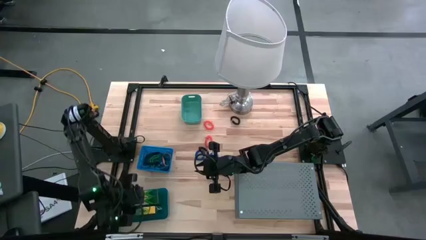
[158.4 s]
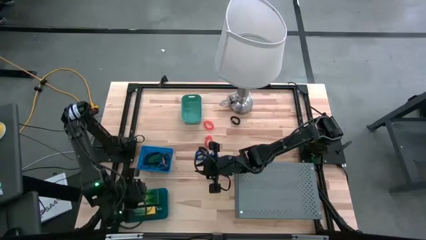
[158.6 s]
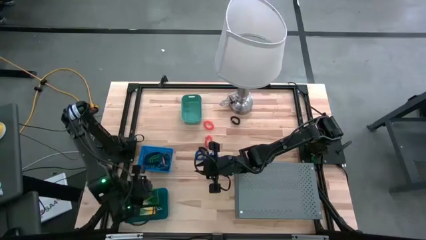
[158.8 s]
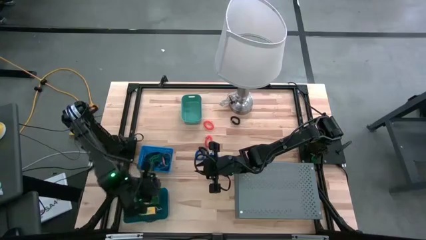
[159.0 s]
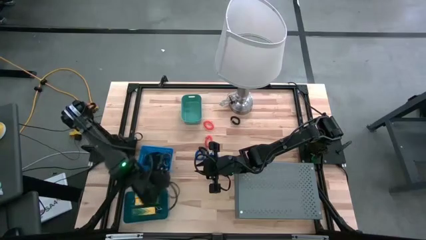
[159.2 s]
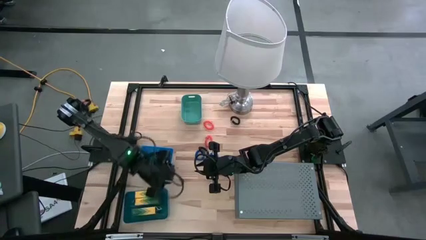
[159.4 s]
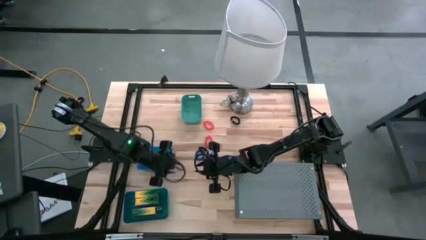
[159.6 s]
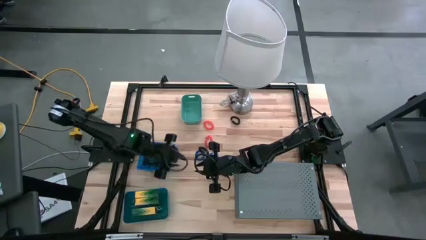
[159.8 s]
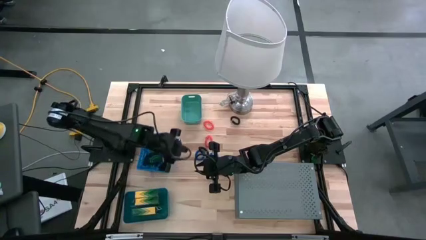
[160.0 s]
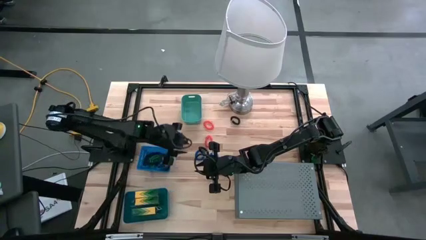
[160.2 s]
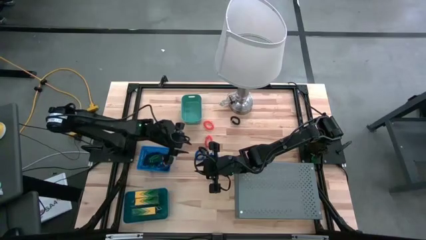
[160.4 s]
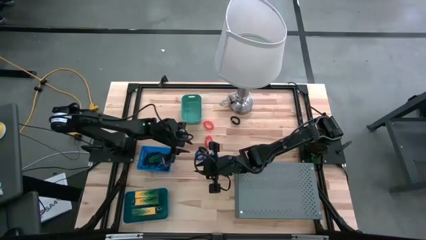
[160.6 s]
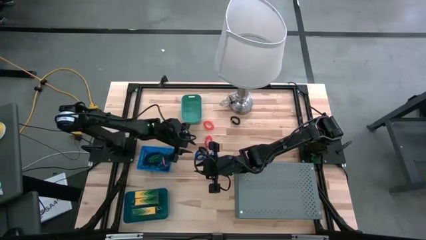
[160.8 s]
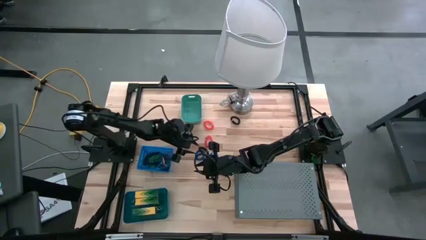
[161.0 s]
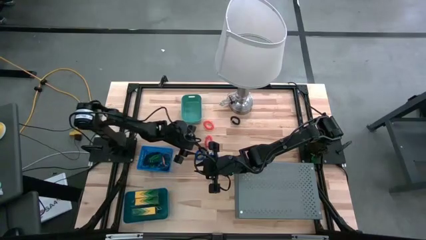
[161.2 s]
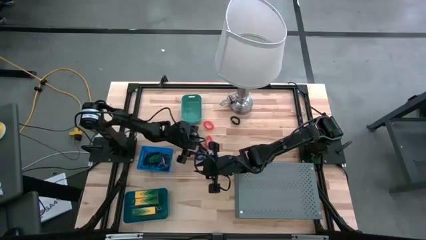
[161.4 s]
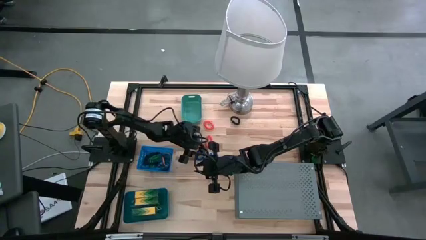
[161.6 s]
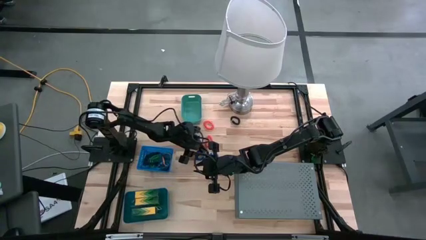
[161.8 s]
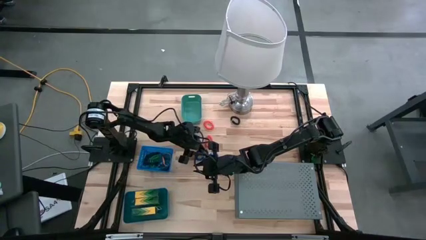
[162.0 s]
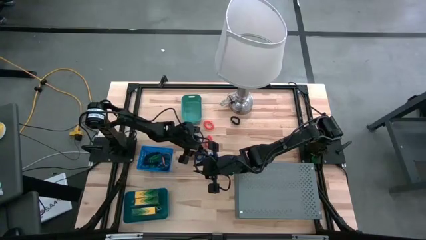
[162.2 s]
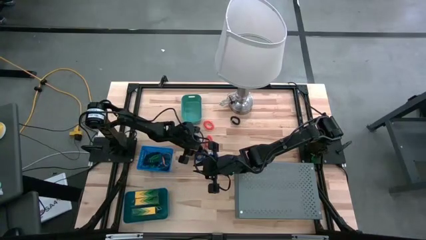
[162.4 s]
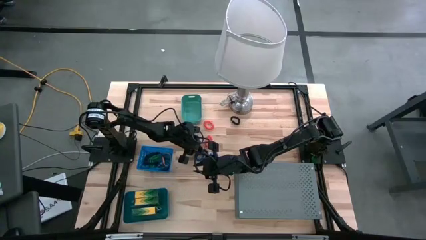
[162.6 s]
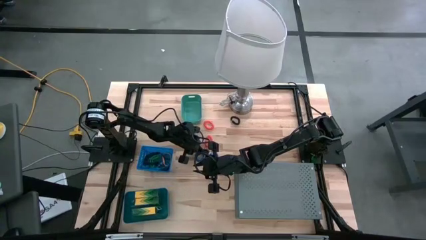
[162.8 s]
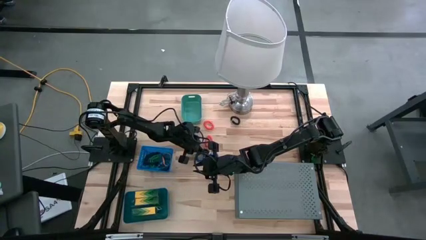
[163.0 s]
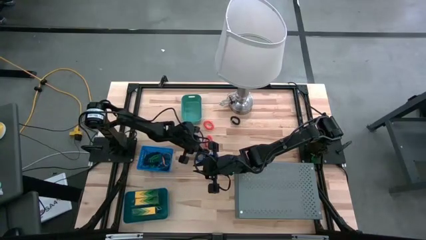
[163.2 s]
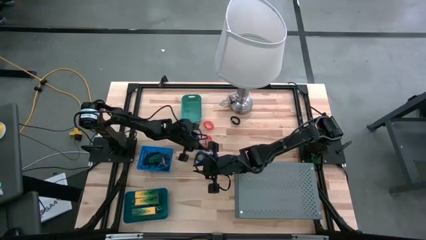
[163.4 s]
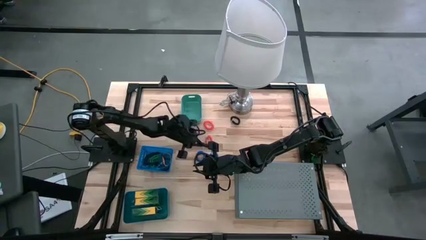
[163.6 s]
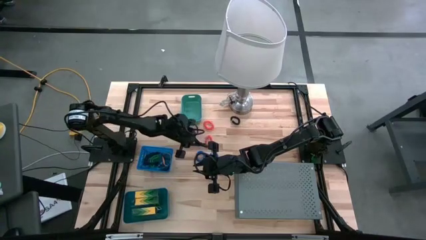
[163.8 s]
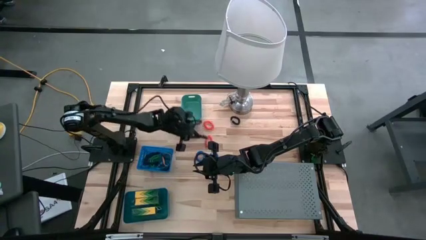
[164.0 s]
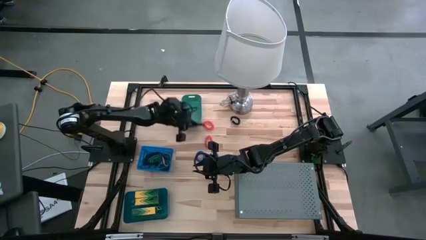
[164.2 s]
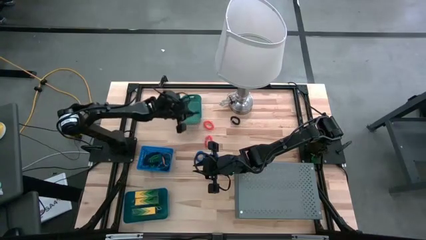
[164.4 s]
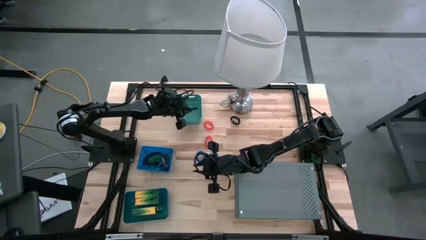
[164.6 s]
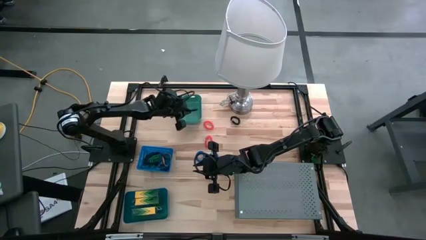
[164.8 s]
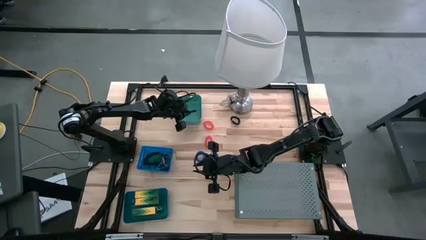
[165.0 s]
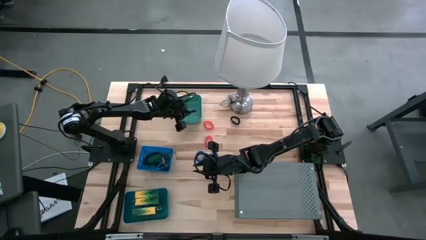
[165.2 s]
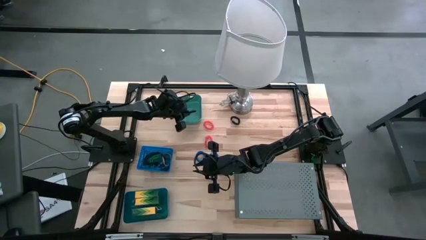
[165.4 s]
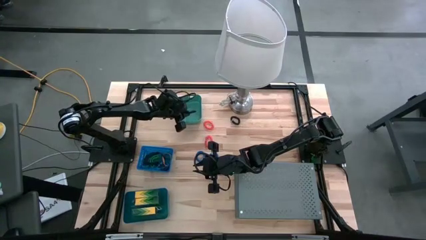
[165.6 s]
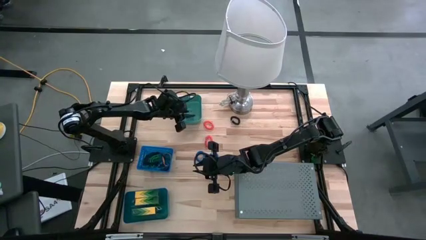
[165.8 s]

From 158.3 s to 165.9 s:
Task: Pick & Place Office Desk Supplies
Put the bottom black spring rubberband into the green bin

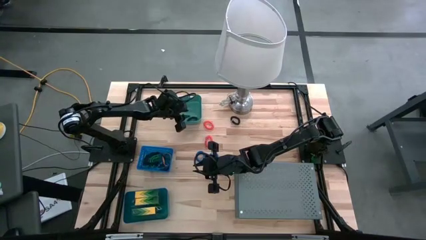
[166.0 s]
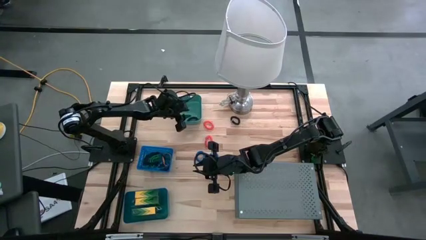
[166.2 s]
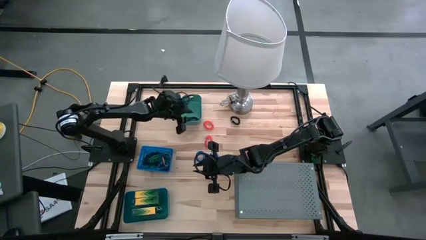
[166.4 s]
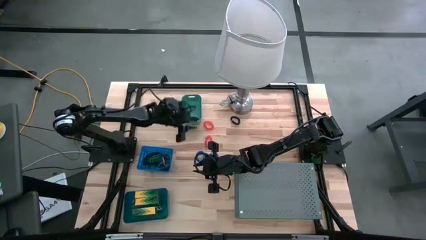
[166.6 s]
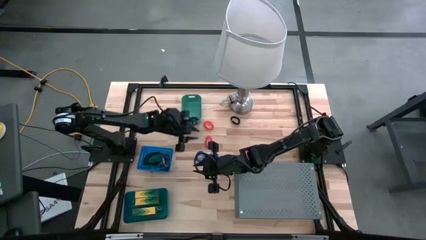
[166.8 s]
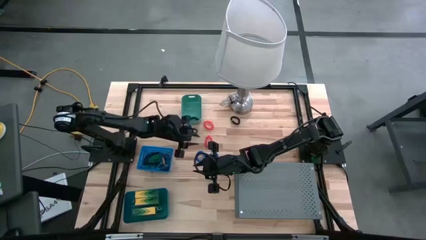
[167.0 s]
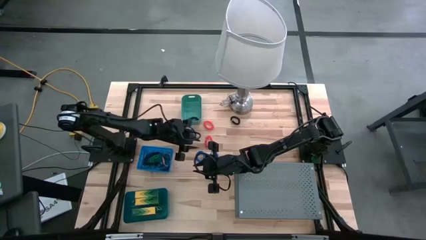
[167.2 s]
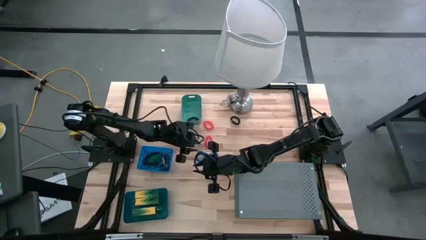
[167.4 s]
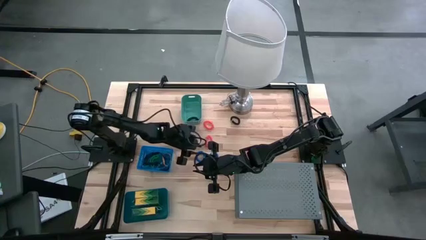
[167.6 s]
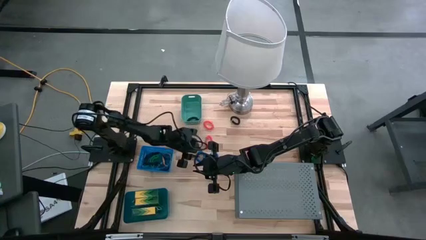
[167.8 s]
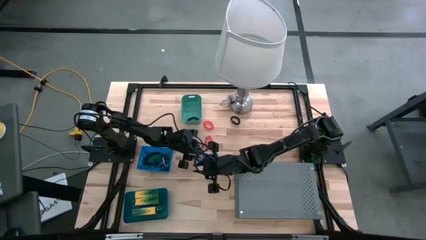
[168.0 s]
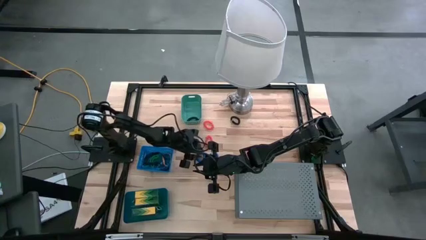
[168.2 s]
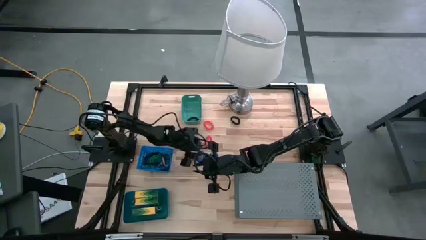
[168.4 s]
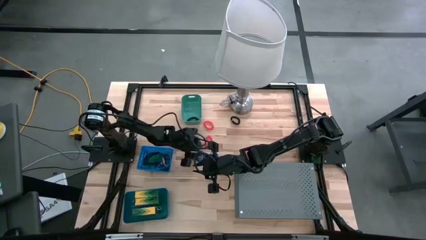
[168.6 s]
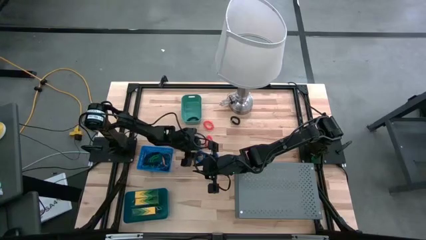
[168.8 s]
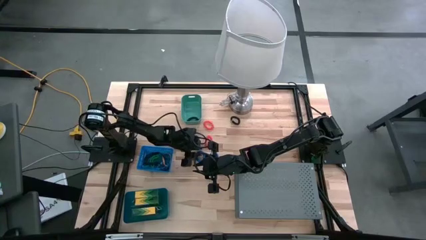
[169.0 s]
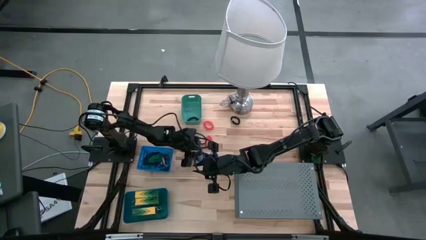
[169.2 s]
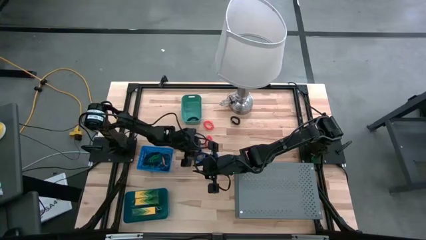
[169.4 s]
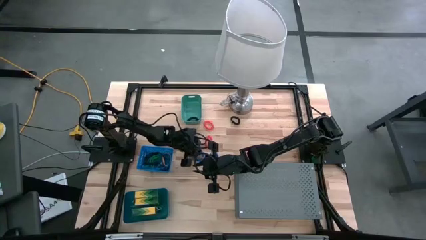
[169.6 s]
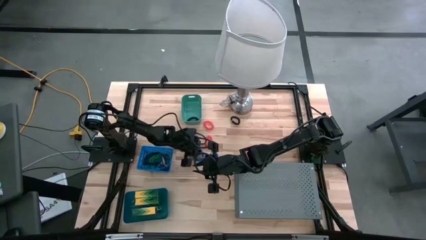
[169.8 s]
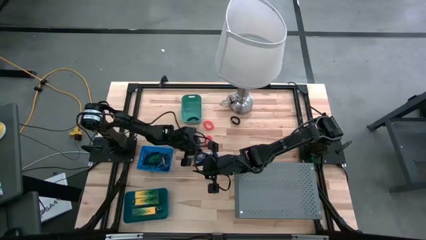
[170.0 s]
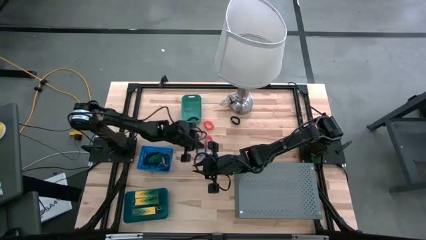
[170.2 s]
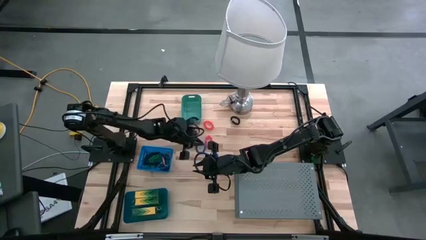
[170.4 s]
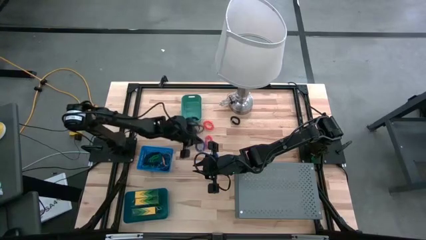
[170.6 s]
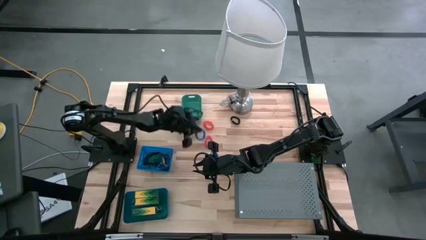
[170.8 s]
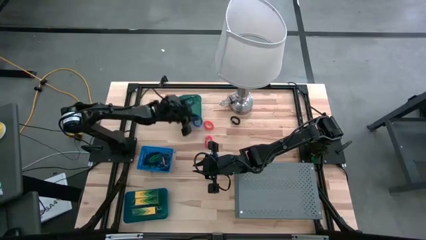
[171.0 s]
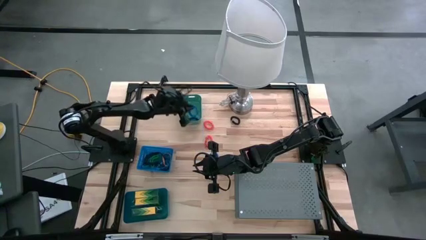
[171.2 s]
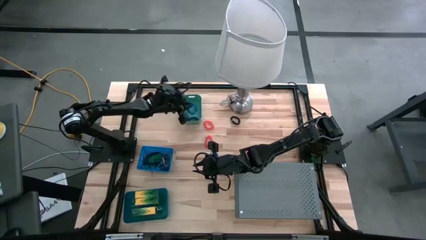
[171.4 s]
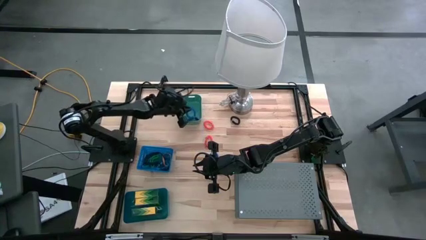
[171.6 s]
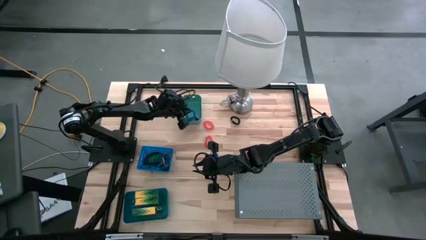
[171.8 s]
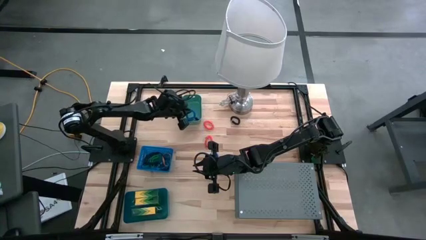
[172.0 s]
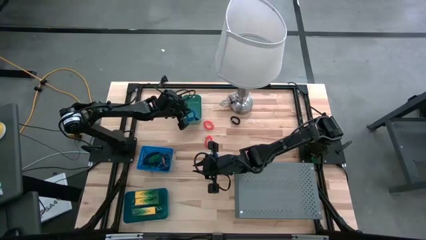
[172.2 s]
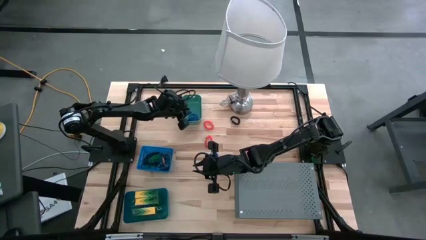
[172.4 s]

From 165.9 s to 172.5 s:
Put the blue spring rubberband into the green bin

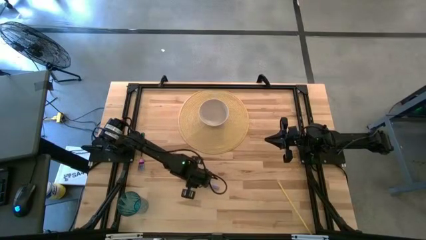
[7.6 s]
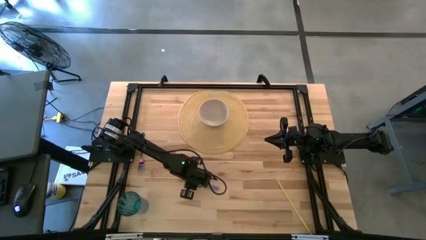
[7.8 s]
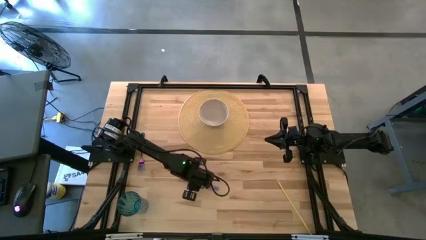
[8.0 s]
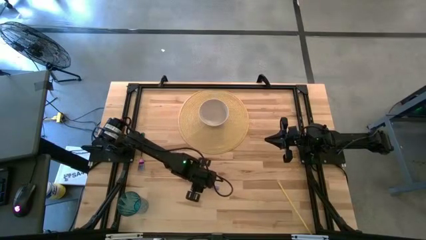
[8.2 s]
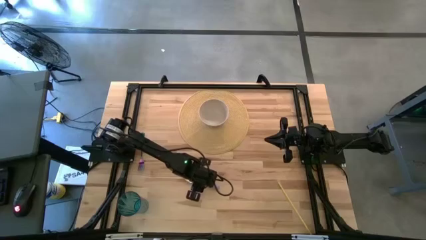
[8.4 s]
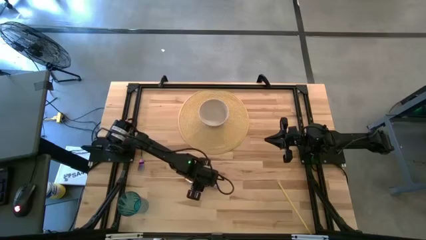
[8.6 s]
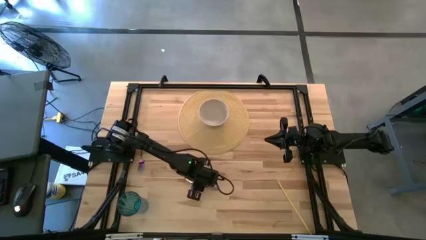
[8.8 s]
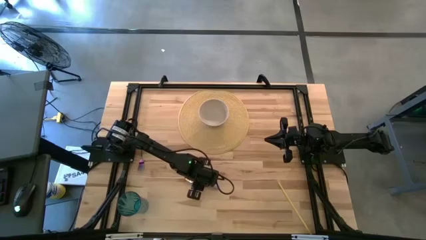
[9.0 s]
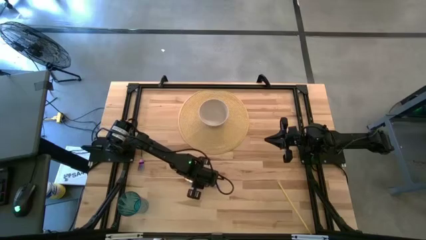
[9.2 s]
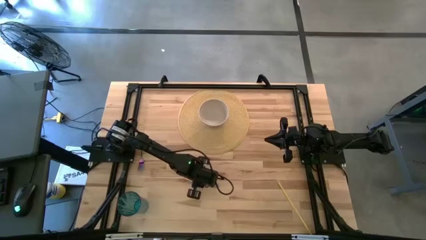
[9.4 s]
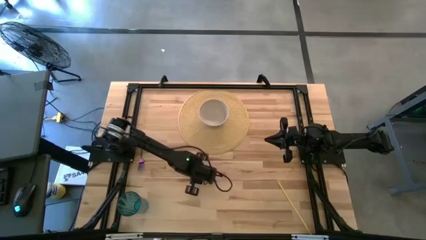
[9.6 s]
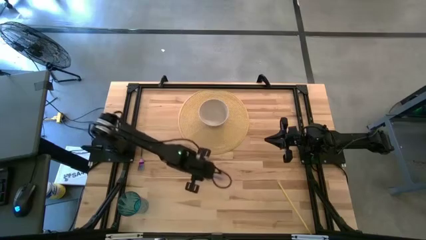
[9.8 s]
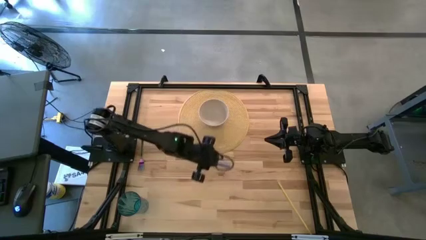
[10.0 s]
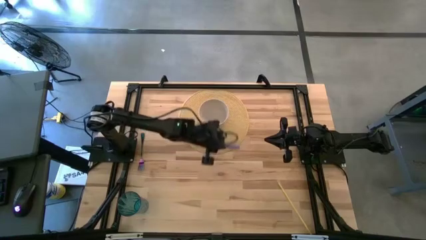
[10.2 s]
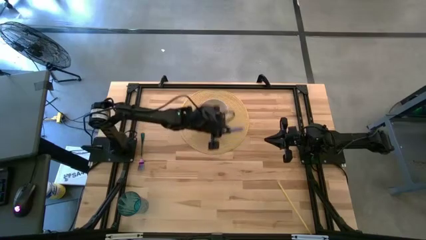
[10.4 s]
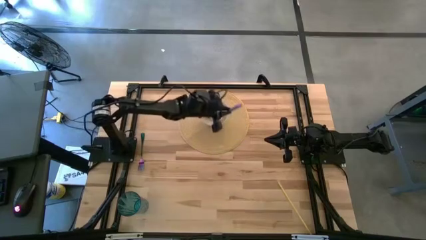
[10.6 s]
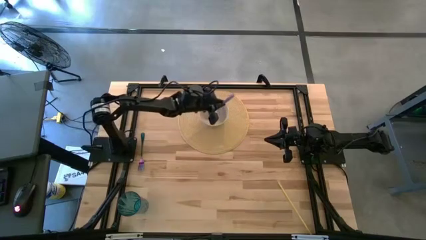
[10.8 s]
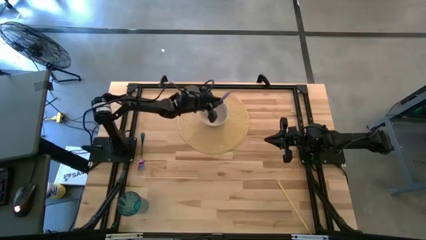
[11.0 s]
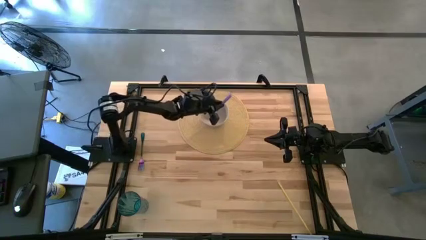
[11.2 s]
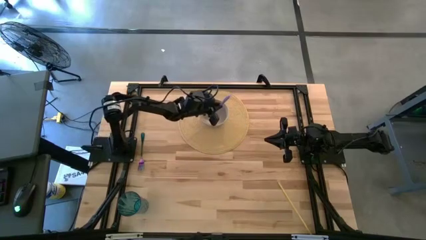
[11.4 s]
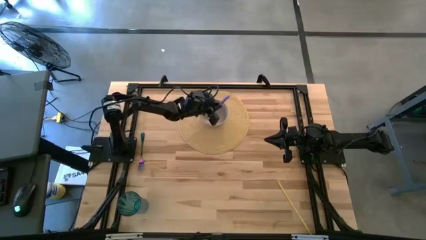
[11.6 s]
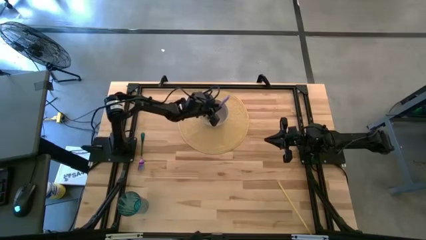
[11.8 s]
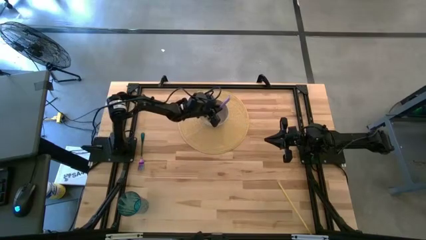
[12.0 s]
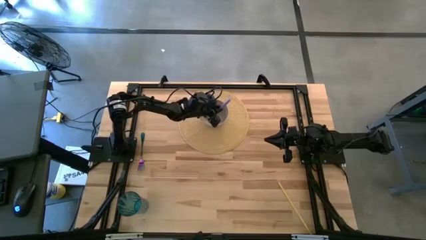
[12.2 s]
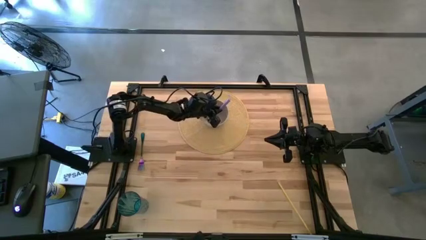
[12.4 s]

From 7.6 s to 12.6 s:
Task: Pick & Place Utensil
Put the purple spoon into the white bowl
